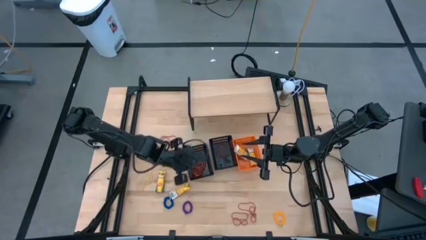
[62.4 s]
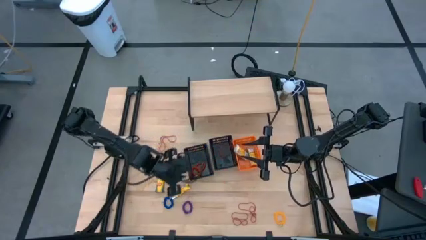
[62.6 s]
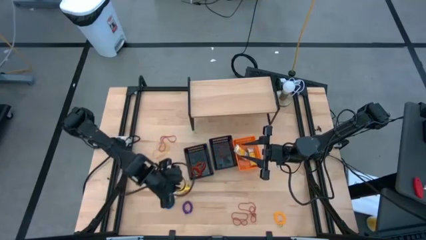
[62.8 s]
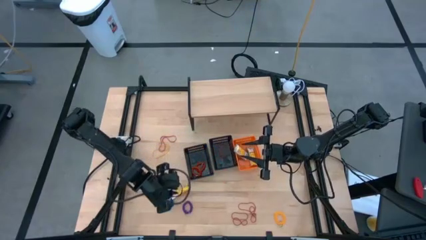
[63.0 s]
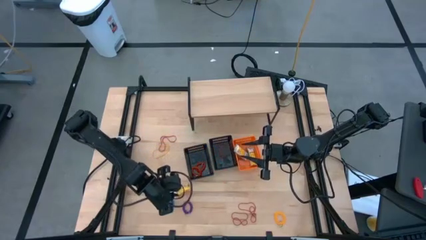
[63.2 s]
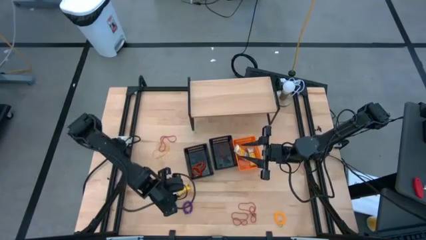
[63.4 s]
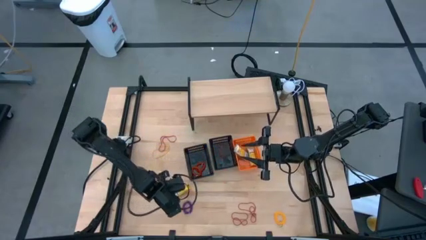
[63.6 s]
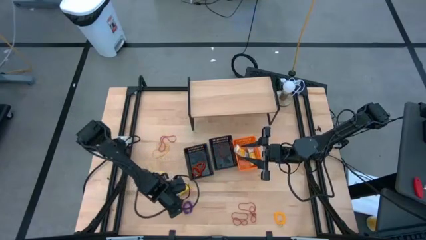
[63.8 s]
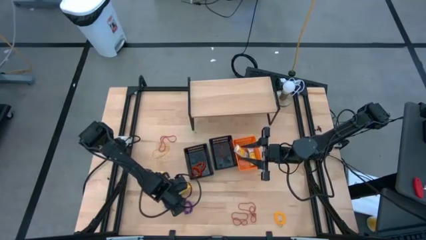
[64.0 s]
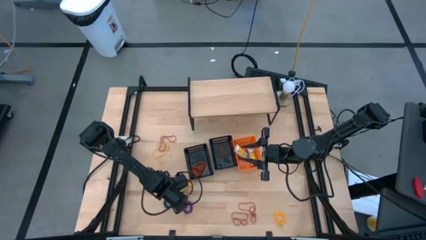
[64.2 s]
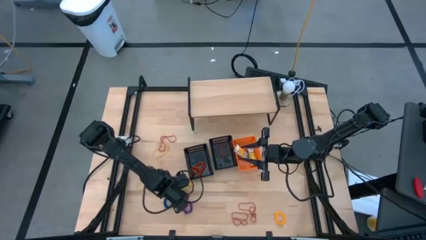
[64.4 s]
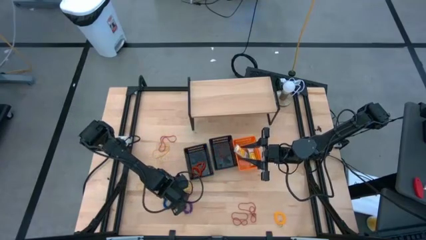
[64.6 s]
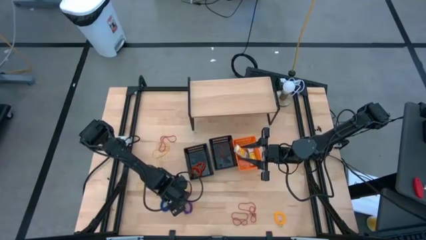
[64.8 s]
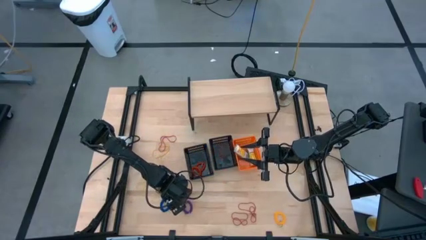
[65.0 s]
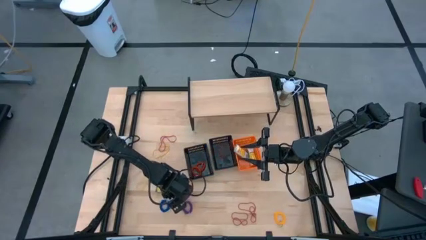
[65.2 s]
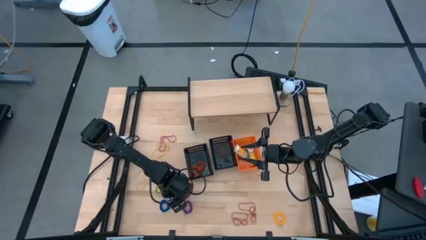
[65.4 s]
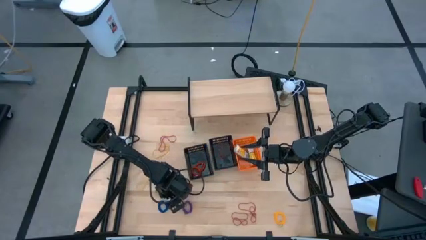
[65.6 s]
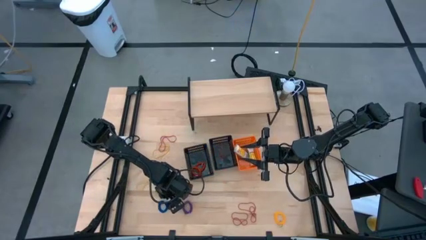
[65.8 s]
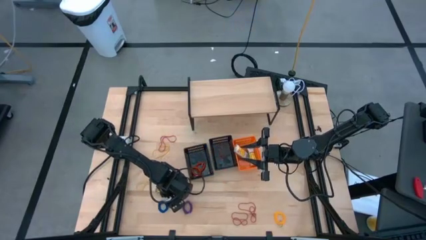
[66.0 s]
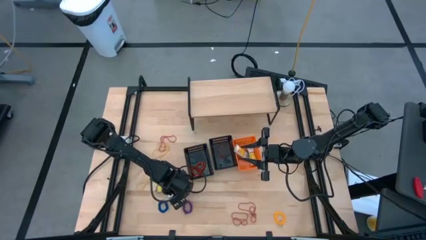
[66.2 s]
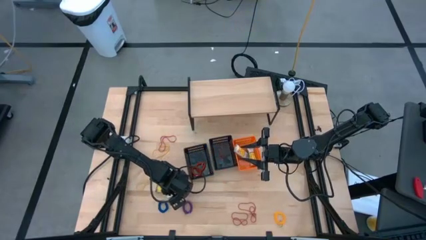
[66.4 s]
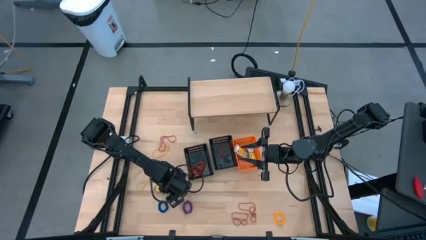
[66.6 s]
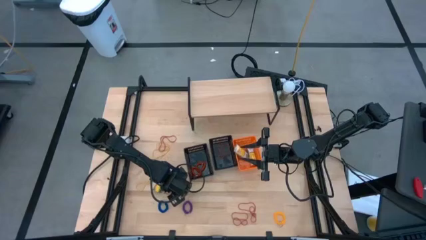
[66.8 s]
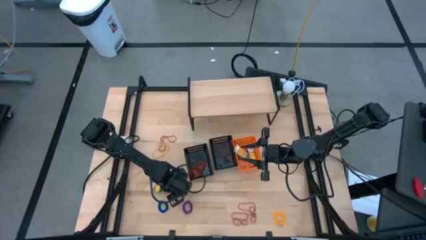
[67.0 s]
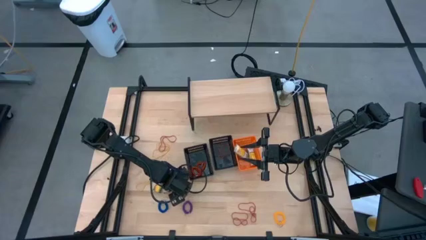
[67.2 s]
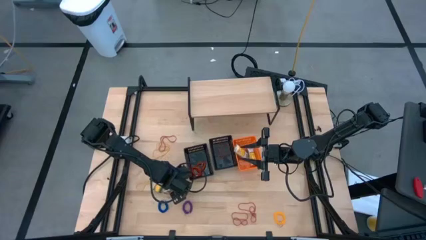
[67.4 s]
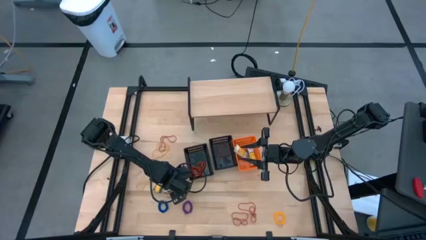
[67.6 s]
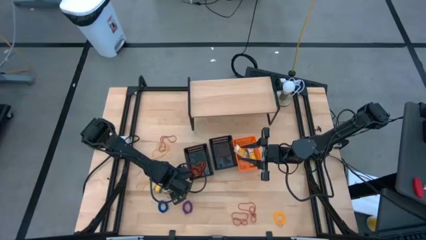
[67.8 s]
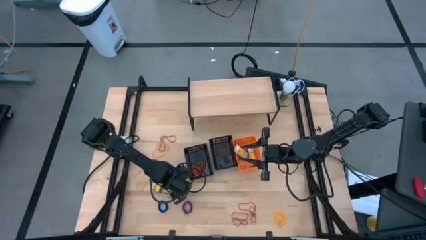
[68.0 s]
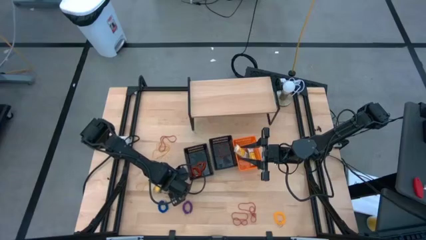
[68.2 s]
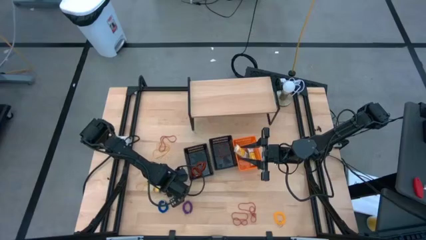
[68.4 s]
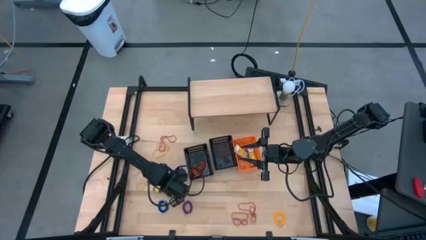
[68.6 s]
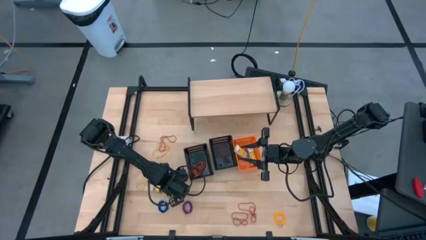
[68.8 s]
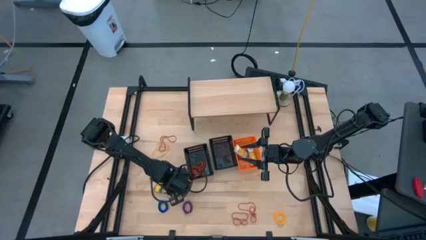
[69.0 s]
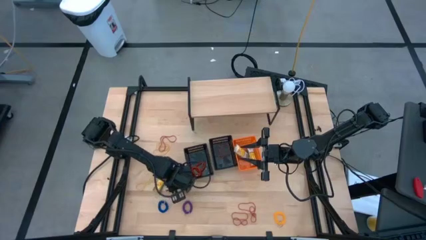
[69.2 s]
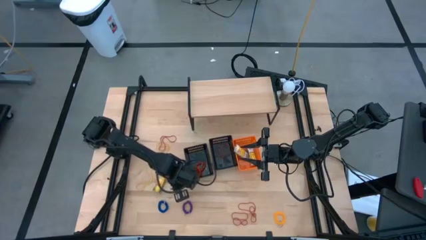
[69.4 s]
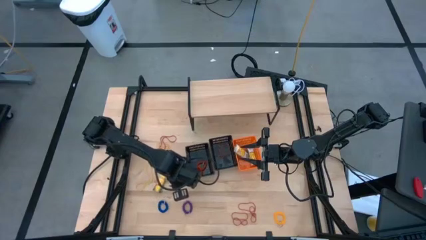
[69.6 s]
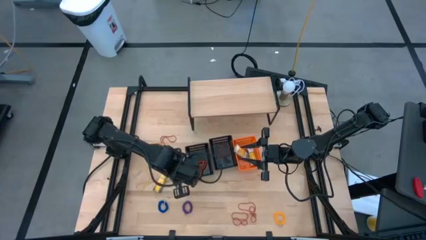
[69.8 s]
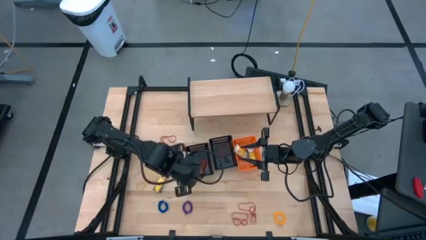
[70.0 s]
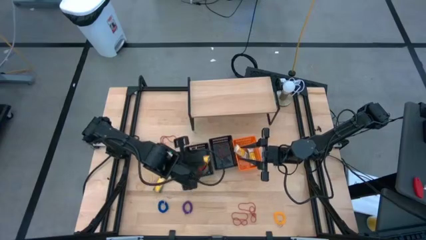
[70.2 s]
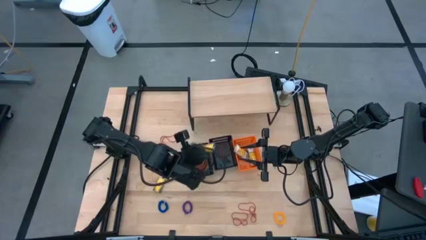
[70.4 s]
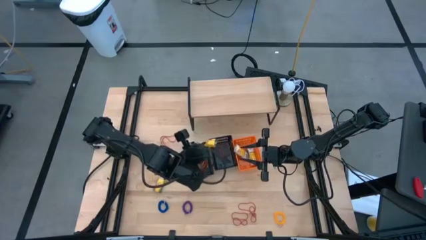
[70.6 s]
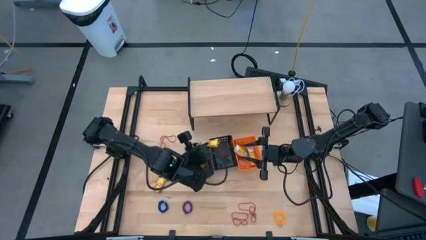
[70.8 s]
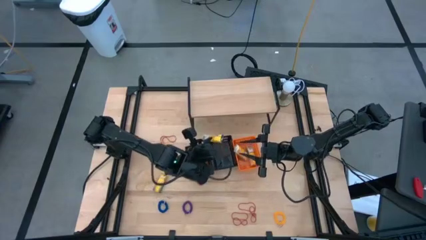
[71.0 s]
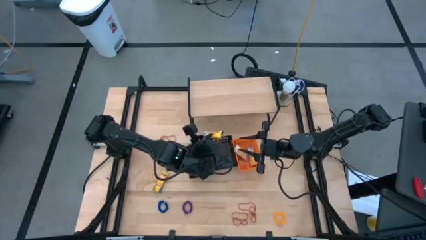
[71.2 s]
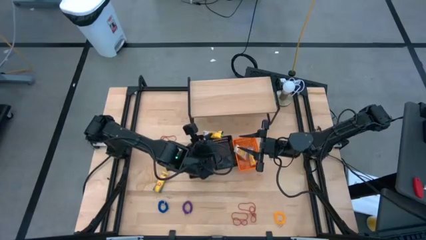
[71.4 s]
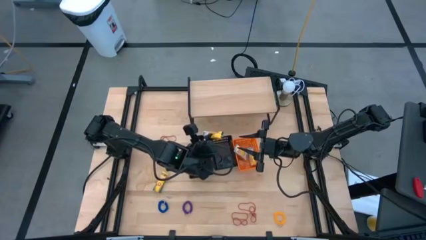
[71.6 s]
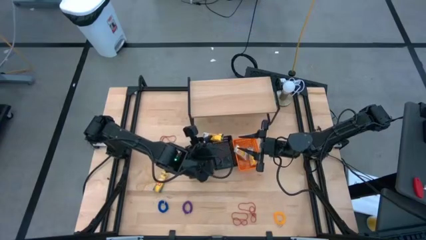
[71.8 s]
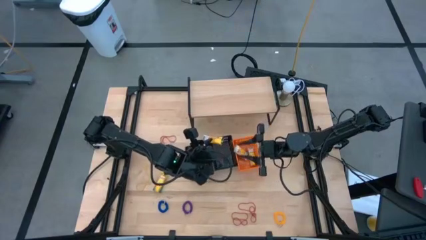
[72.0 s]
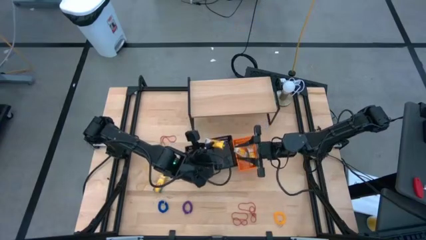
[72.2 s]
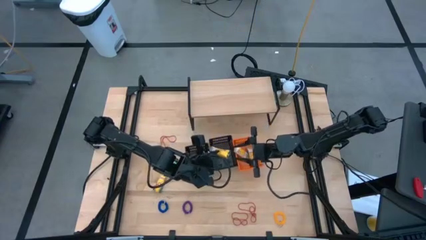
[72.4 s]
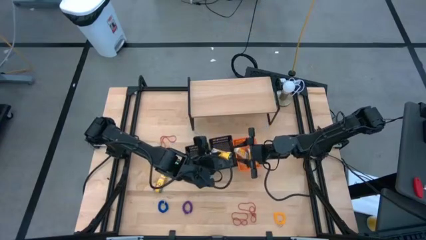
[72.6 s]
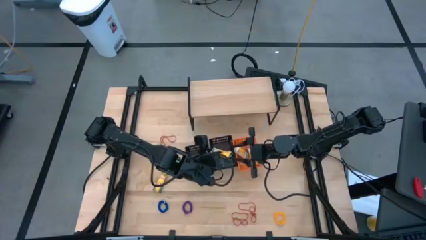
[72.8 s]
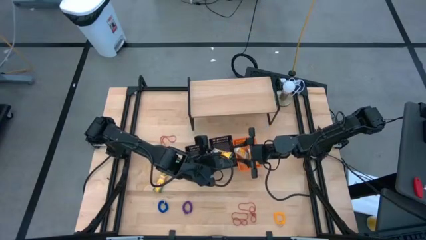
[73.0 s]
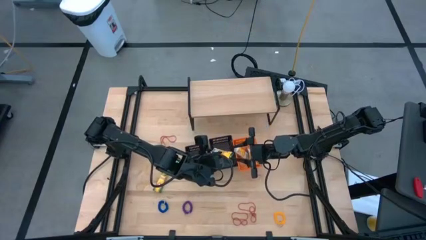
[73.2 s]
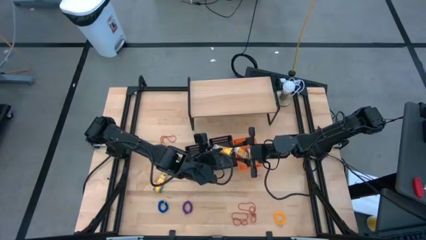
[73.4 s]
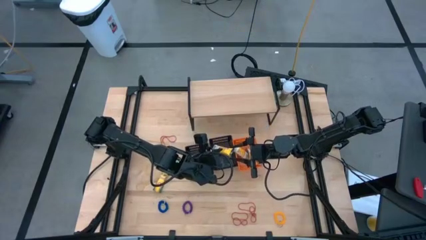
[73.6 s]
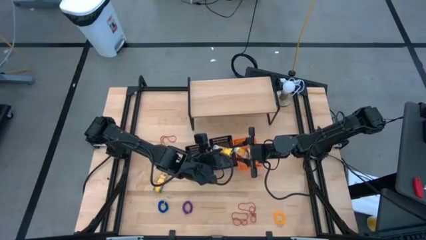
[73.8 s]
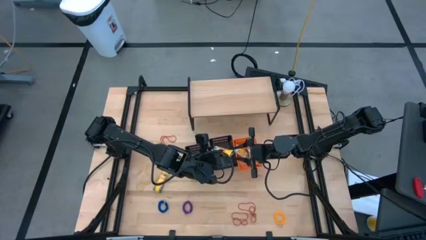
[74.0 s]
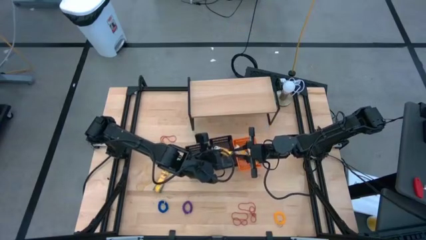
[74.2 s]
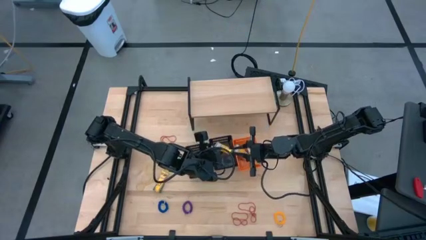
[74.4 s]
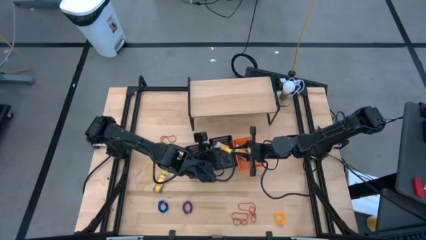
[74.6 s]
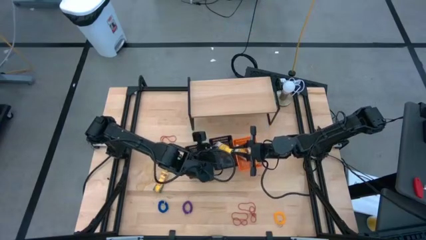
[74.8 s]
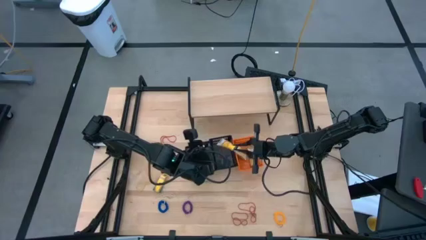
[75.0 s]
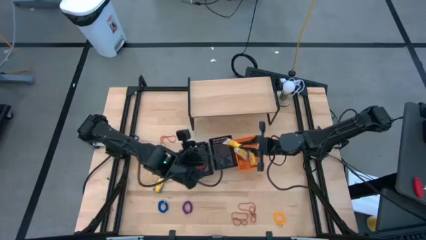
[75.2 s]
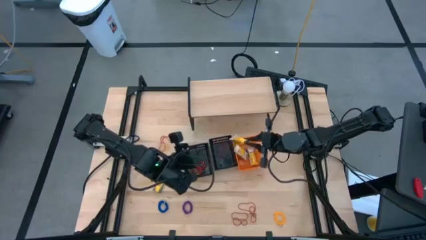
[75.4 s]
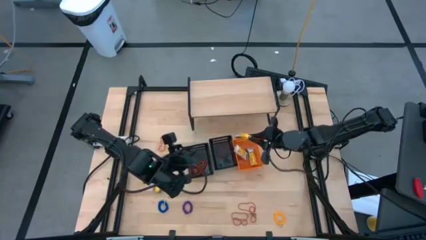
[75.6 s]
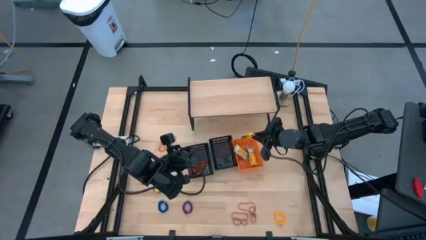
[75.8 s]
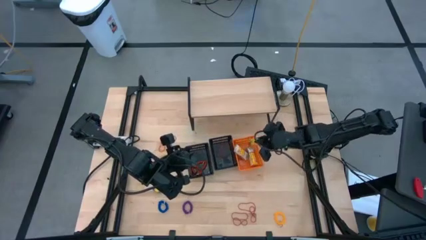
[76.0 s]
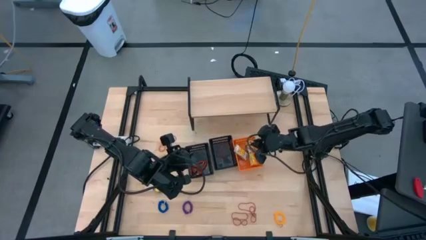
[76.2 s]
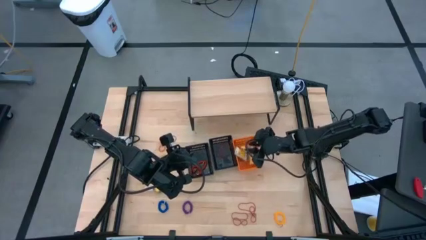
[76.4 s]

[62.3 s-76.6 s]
Task: Pick & Place Office Desk Supplies
Put the yellow crayon bag into the orange bin

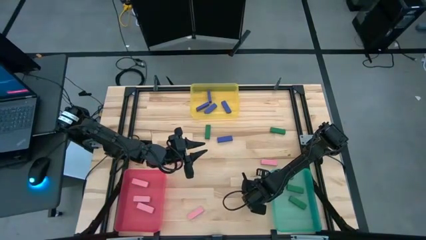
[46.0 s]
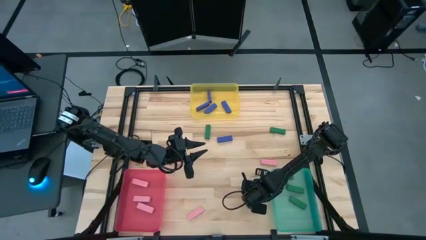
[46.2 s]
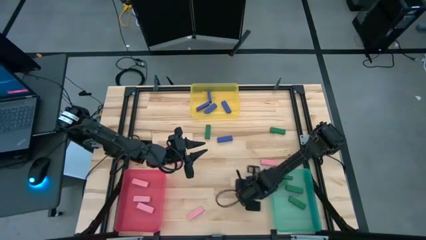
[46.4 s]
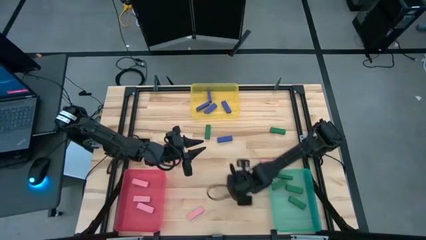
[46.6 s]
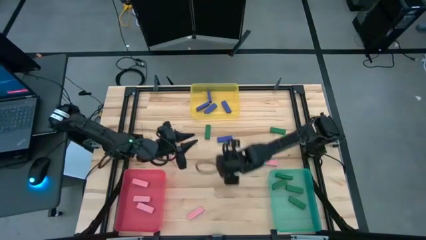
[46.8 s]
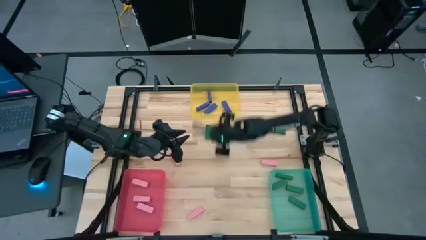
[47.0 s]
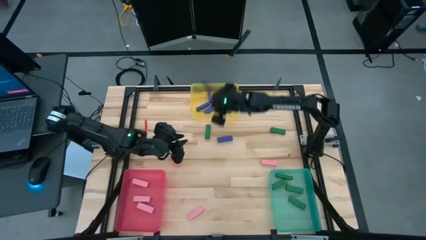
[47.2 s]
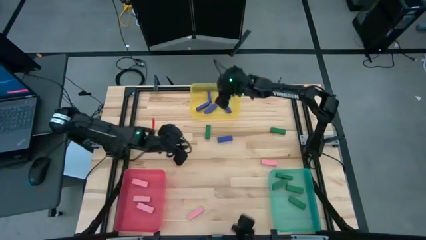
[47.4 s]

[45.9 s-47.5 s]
Task: Sort blocks
Put the blue block into the yellow bin

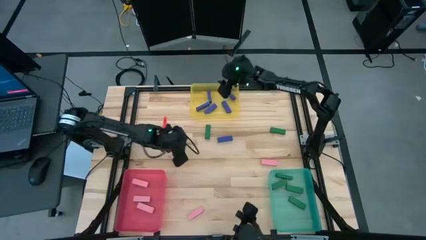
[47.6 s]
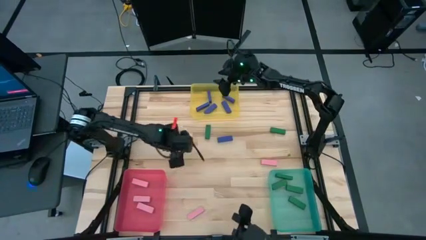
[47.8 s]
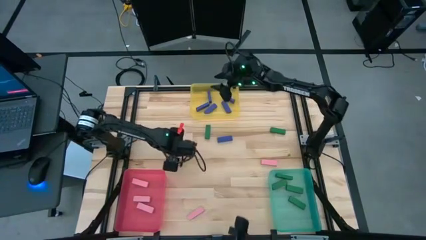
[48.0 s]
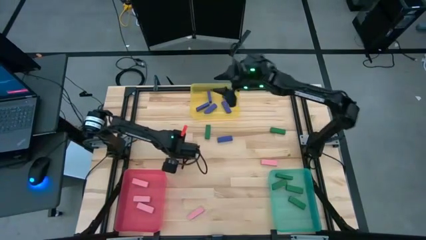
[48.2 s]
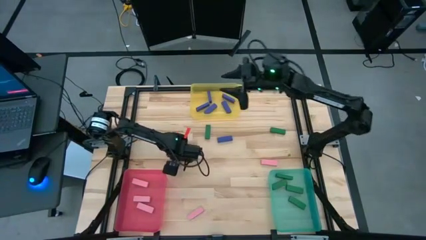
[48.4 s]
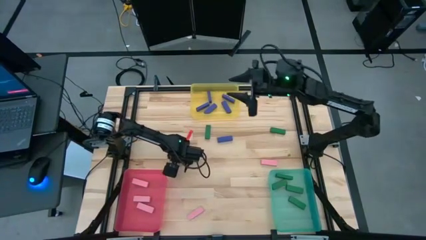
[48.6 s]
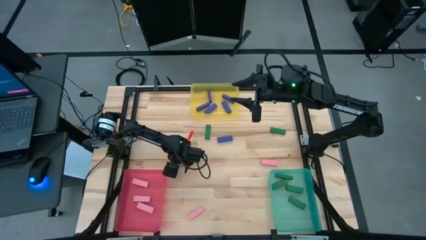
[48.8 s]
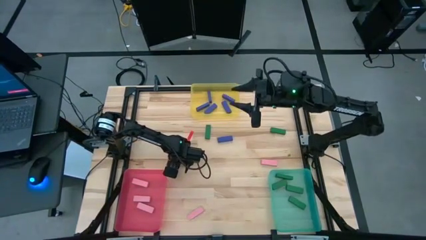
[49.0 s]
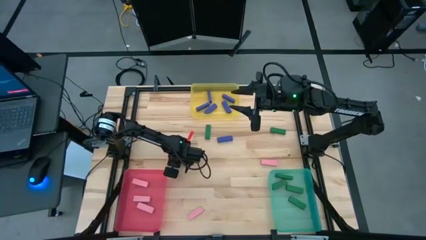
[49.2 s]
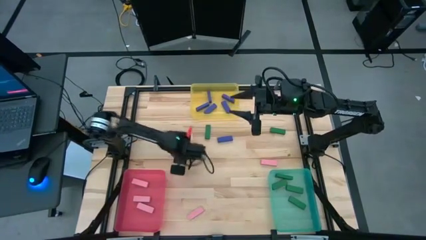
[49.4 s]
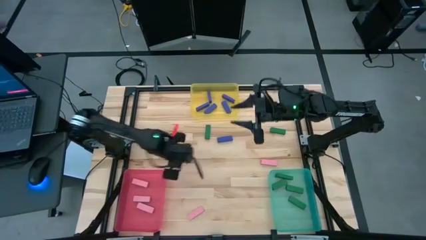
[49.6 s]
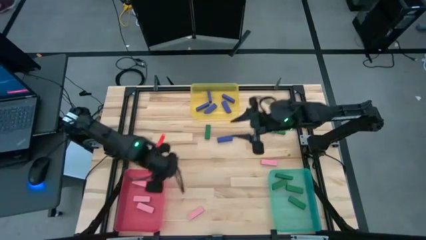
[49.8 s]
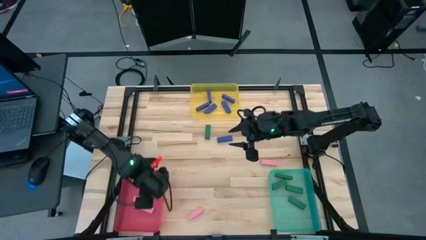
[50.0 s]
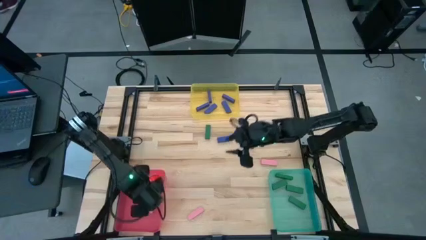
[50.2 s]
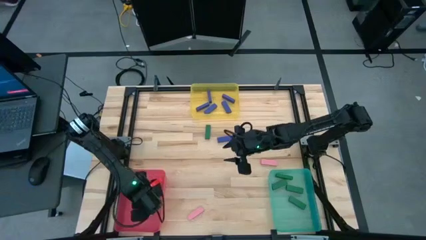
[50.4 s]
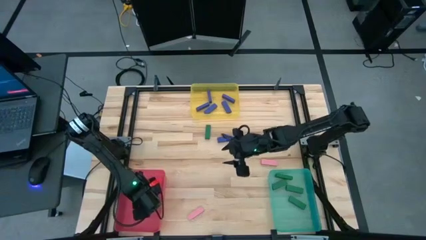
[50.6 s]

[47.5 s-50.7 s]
Put the pink block into the red bin
